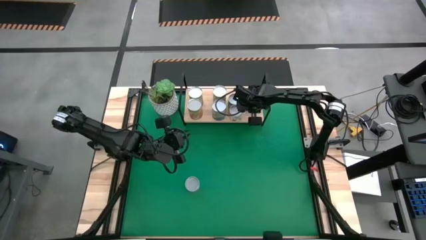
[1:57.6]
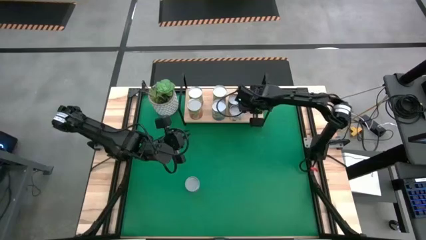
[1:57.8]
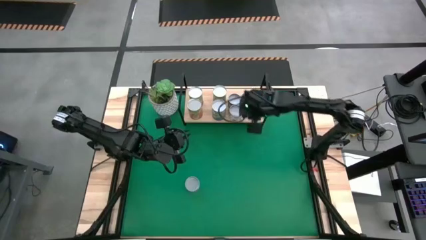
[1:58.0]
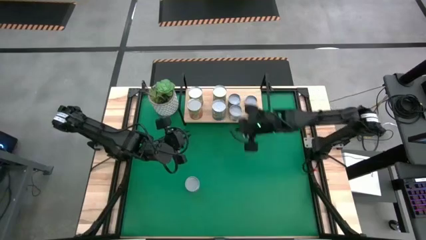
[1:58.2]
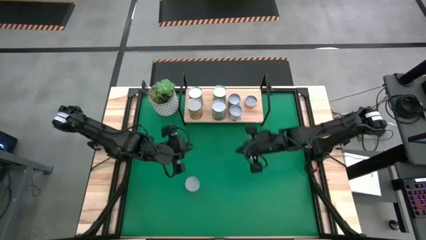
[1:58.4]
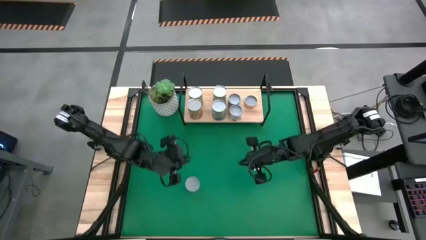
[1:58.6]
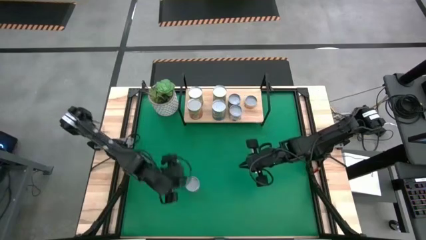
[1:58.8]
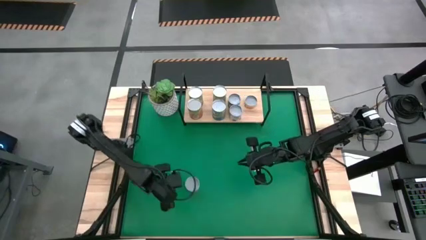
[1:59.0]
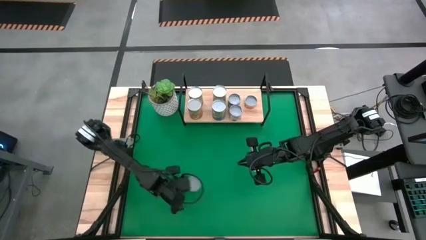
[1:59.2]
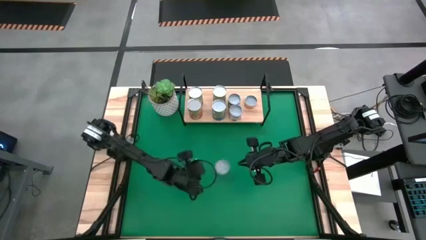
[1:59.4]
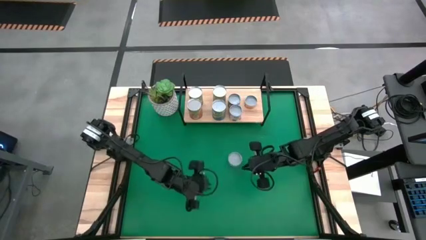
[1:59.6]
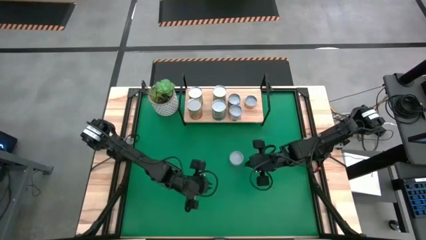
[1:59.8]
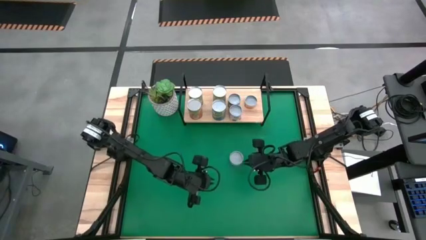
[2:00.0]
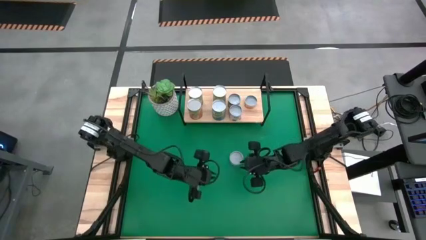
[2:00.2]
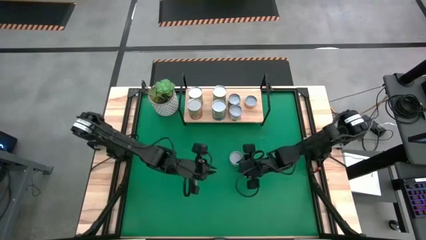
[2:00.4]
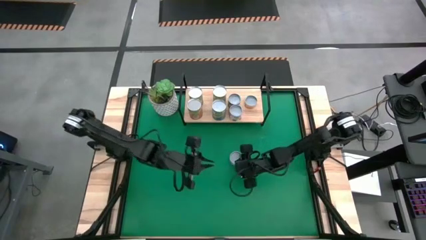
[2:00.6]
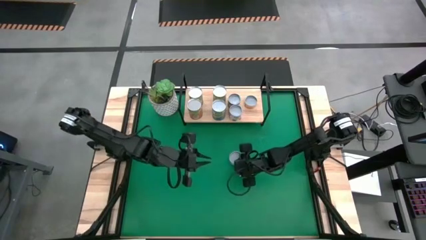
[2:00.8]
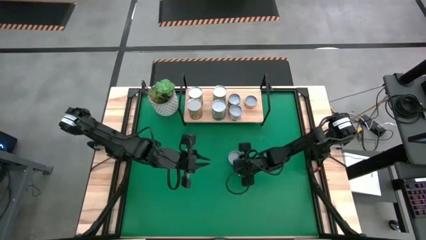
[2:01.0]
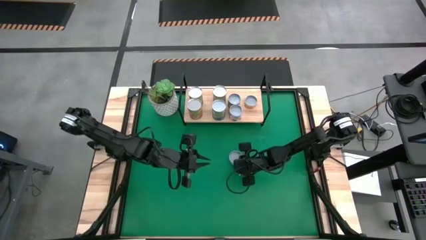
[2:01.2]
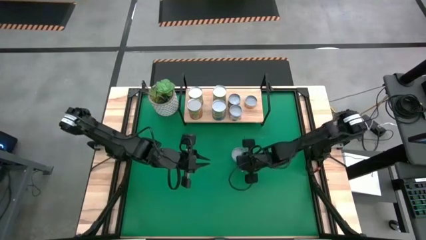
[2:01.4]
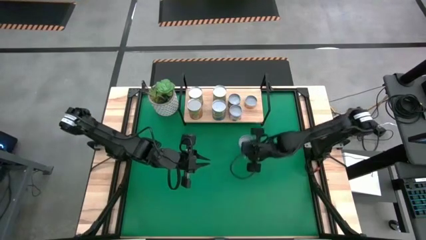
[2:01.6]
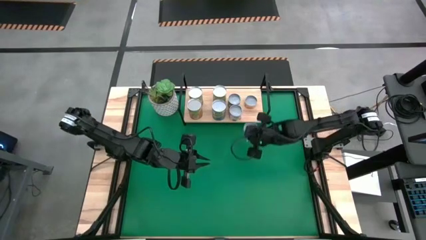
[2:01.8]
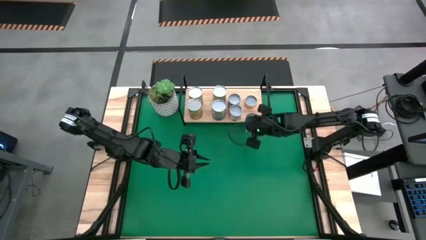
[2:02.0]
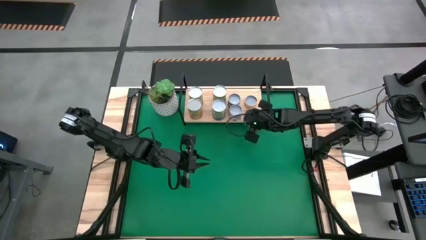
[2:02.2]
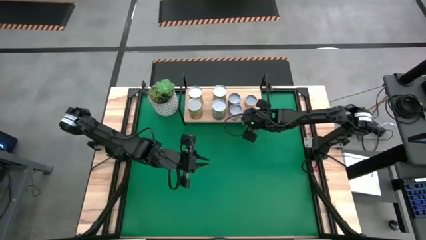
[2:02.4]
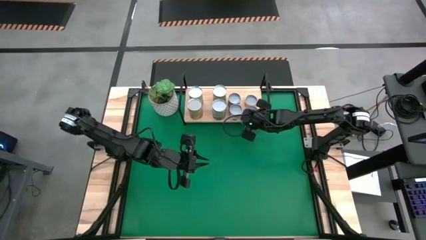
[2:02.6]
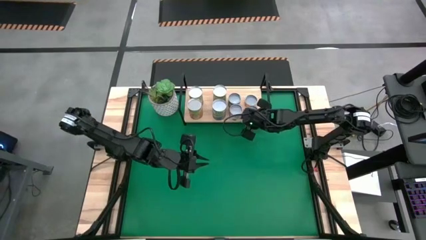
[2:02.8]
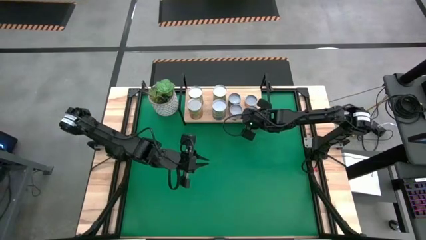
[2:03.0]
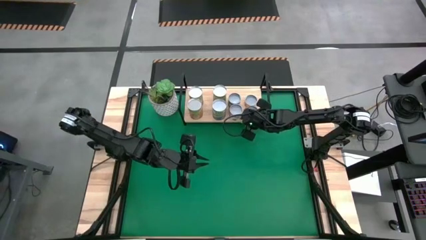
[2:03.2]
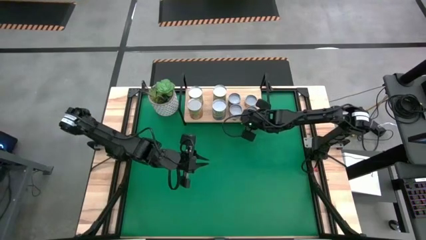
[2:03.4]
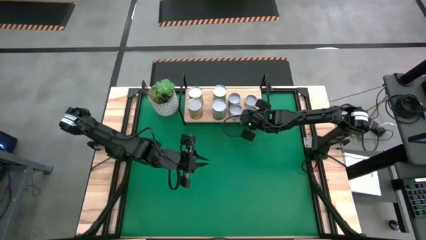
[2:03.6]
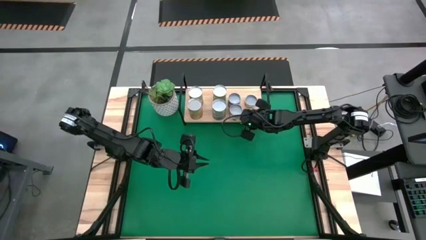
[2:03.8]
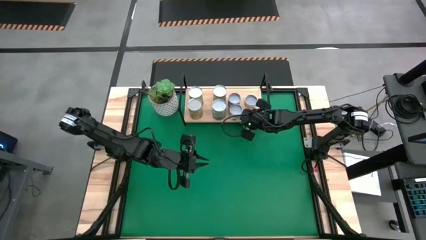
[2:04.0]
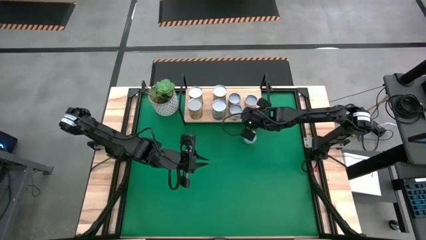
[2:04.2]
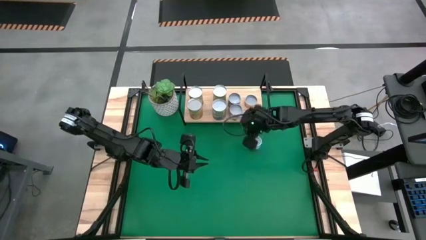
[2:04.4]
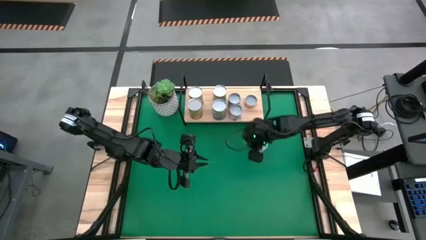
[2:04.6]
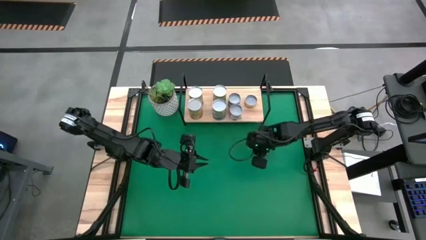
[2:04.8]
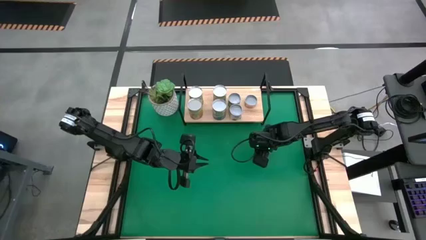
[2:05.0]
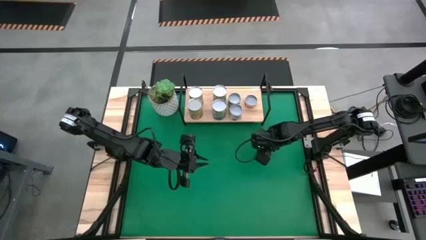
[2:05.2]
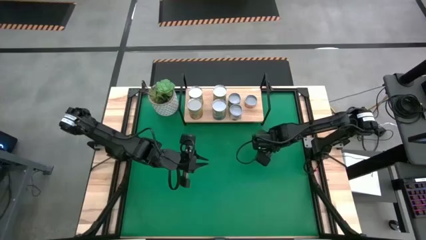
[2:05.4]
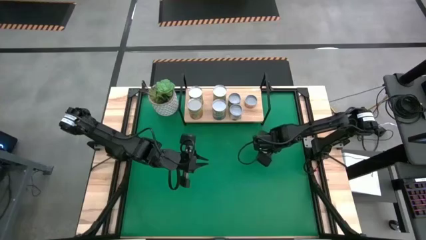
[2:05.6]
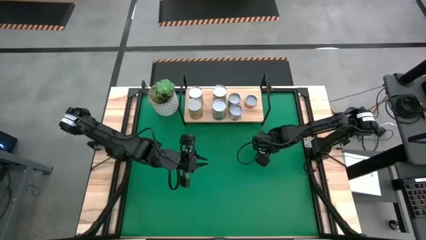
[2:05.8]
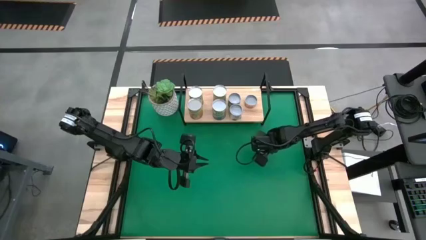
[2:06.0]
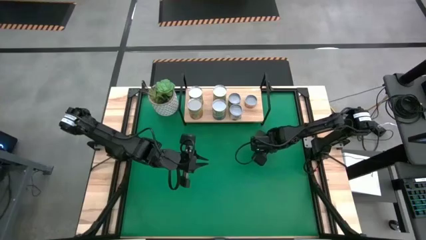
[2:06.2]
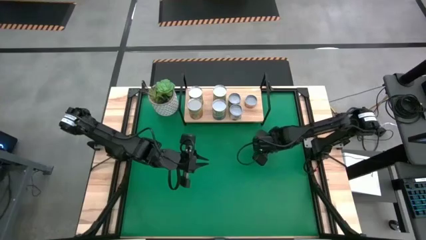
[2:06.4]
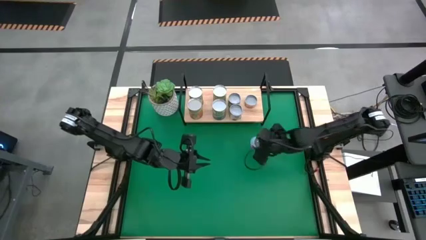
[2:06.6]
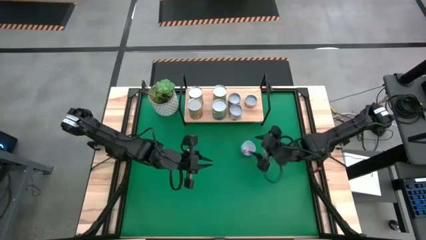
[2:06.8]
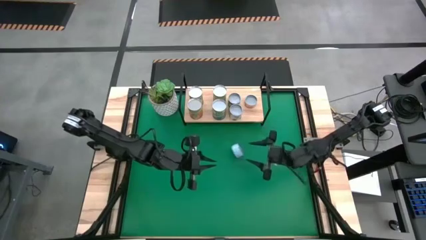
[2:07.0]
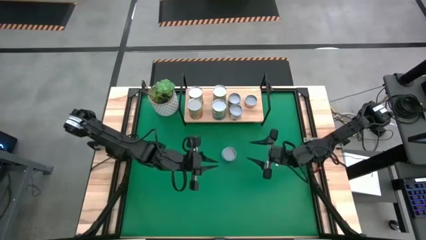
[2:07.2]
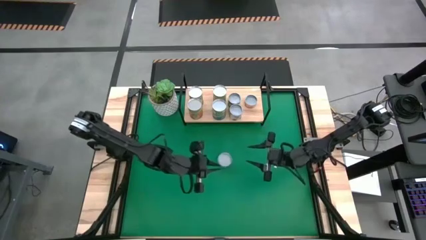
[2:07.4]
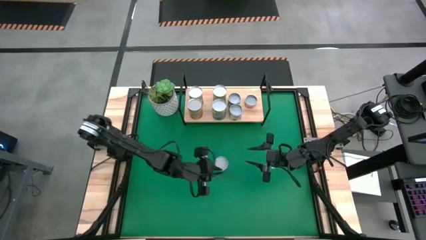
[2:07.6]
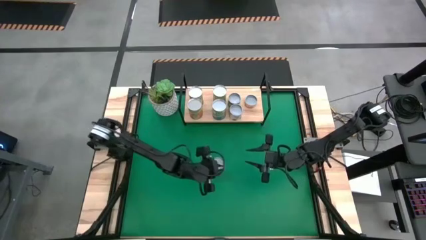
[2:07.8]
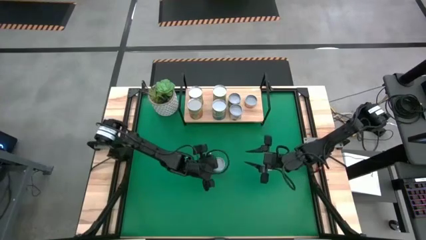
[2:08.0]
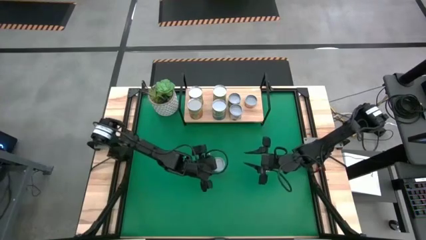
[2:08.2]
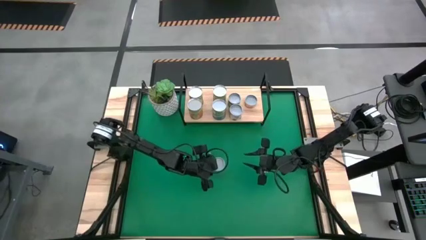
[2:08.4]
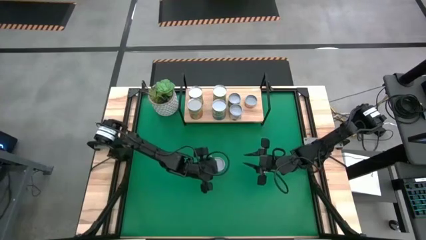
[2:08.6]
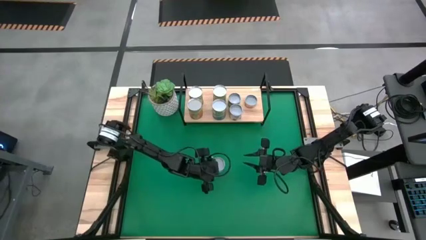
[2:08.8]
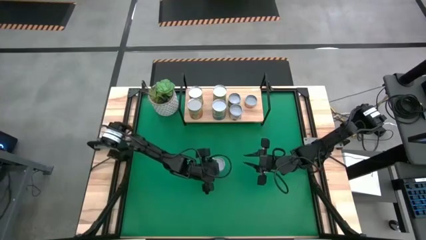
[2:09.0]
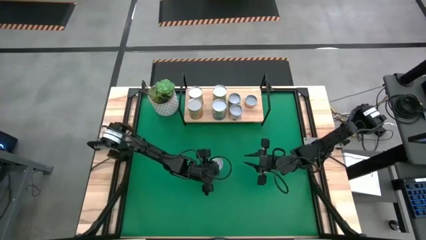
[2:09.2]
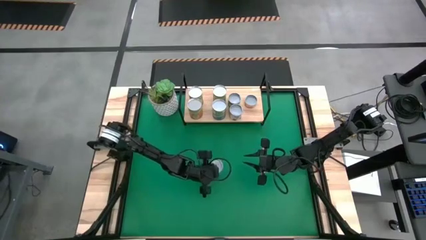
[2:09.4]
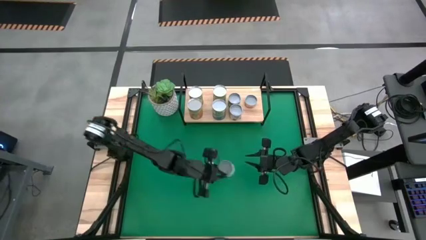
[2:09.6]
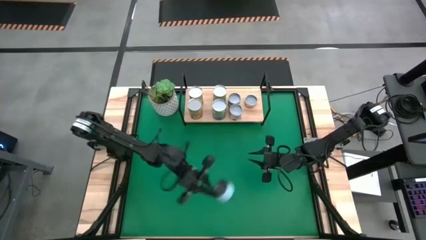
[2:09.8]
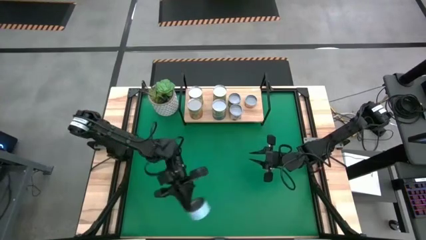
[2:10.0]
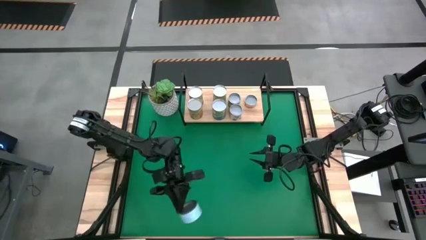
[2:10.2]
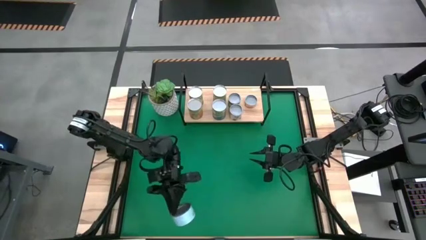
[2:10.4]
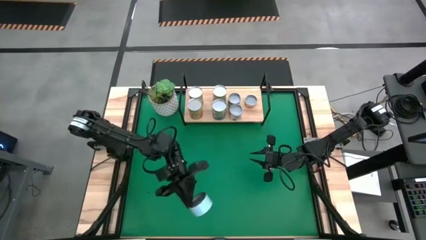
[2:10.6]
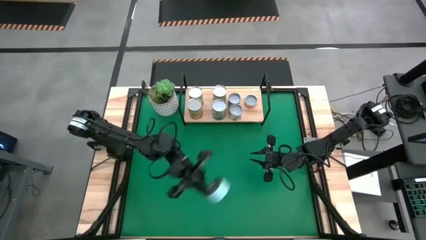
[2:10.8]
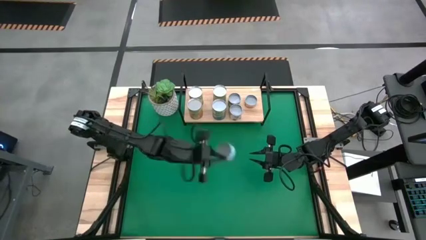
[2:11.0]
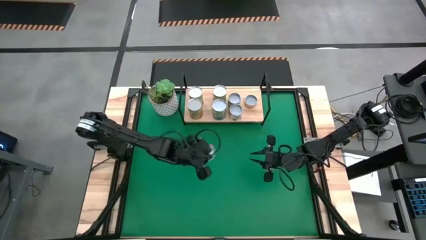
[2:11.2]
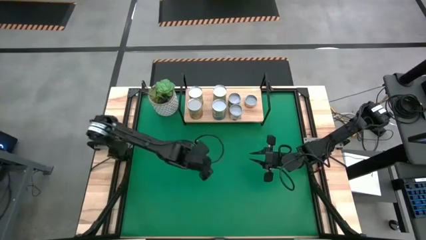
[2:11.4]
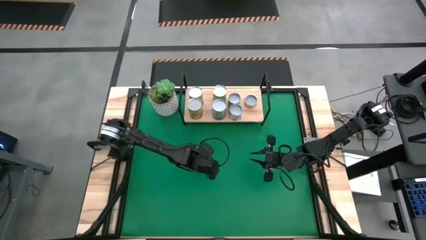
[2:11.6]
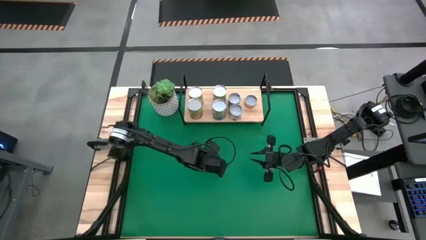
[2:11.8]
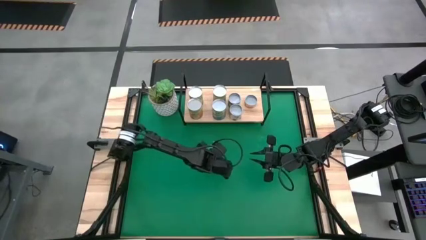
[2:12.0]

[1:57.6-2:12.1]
Task: Pick and place cans onto a shelf
Put the canned tuna on the shelf
